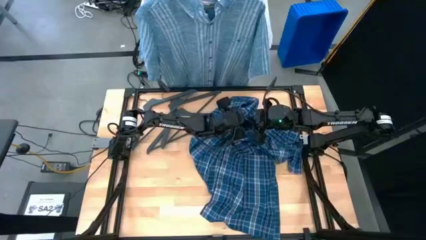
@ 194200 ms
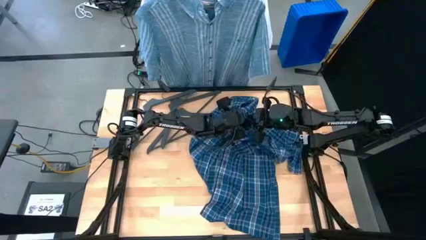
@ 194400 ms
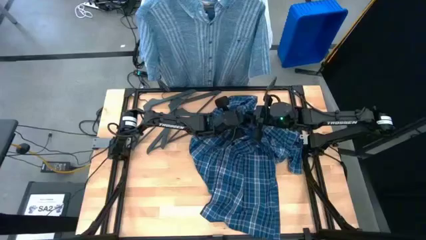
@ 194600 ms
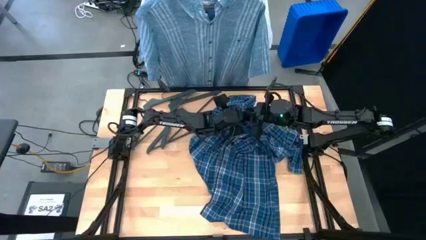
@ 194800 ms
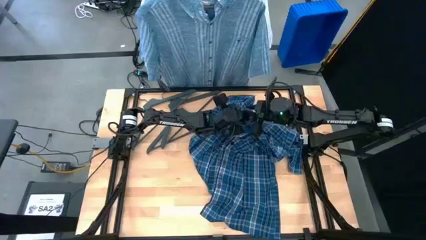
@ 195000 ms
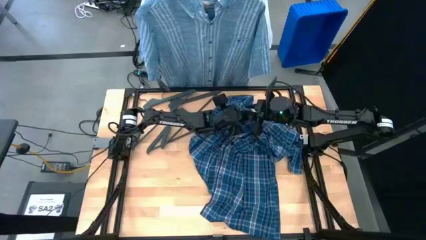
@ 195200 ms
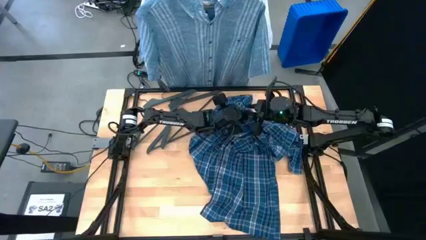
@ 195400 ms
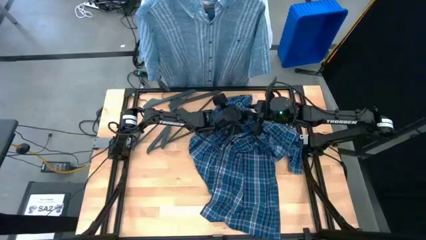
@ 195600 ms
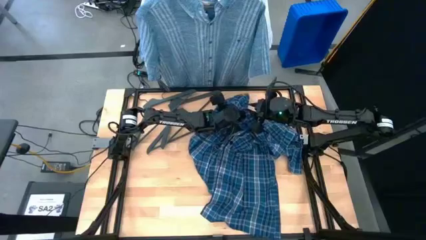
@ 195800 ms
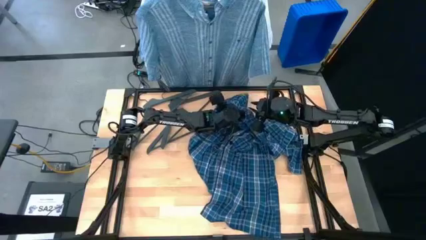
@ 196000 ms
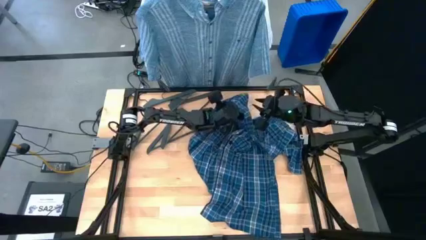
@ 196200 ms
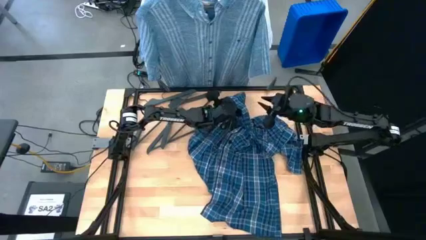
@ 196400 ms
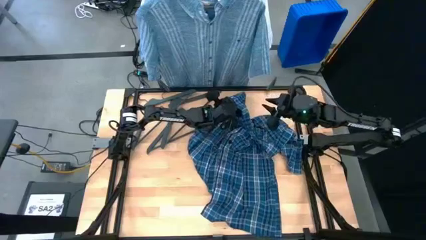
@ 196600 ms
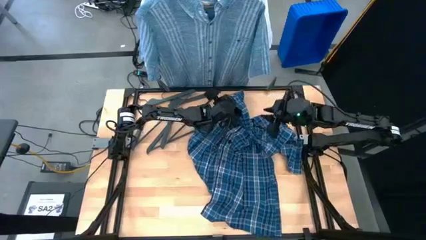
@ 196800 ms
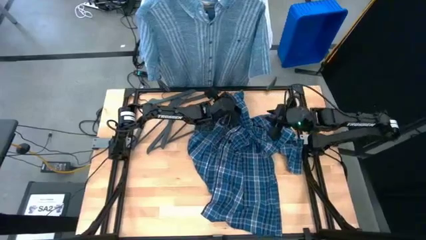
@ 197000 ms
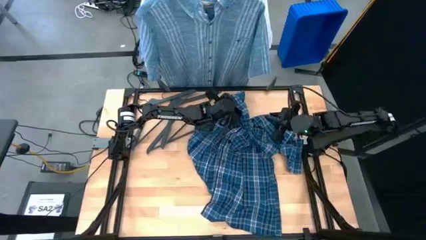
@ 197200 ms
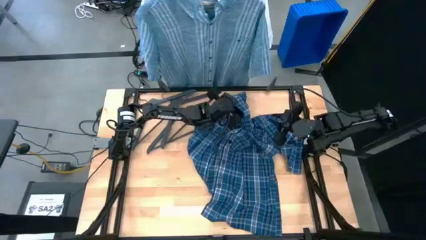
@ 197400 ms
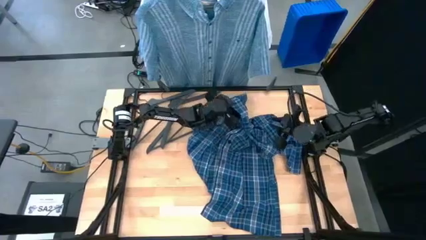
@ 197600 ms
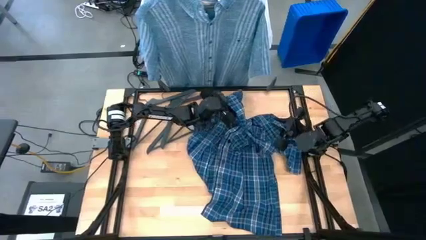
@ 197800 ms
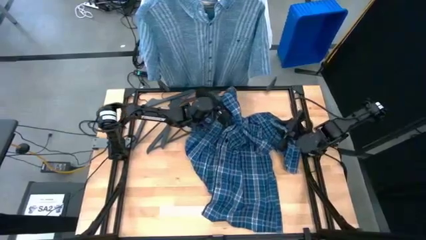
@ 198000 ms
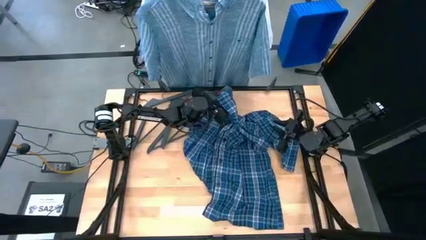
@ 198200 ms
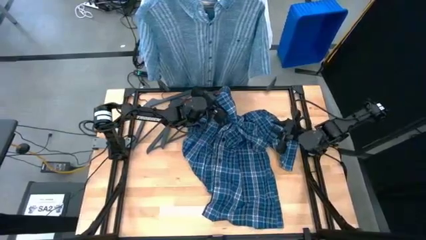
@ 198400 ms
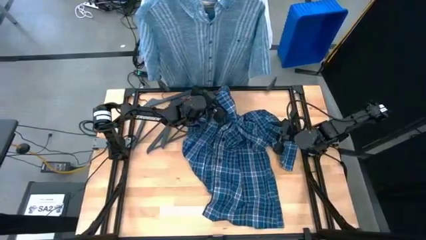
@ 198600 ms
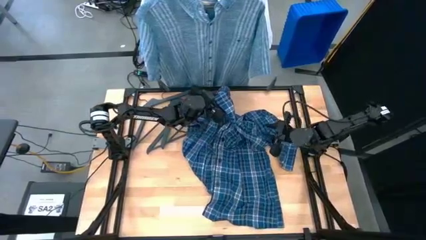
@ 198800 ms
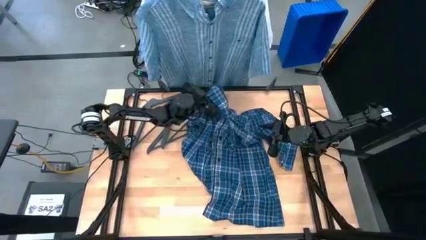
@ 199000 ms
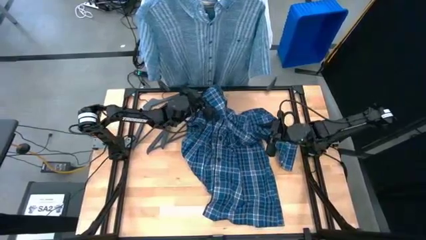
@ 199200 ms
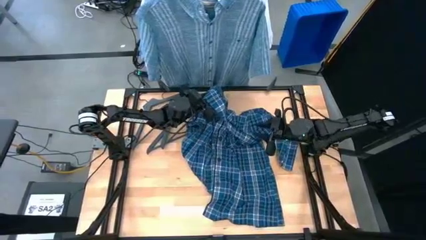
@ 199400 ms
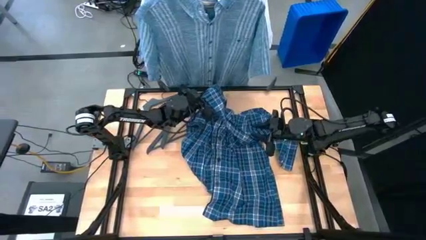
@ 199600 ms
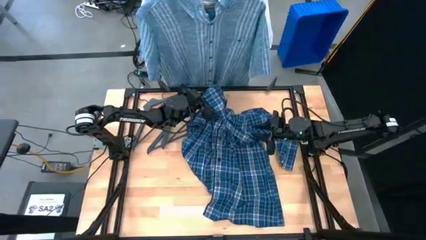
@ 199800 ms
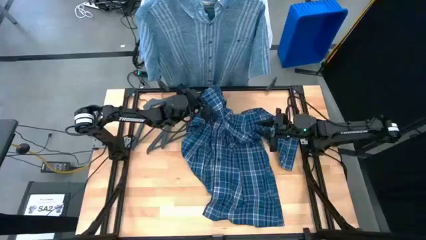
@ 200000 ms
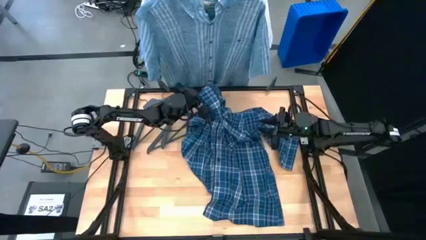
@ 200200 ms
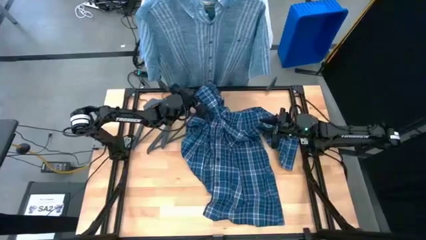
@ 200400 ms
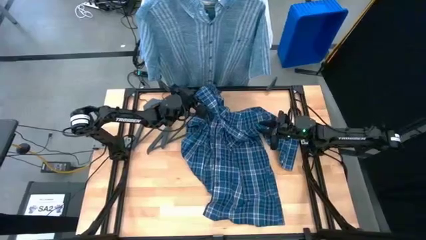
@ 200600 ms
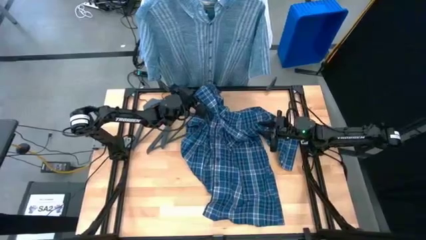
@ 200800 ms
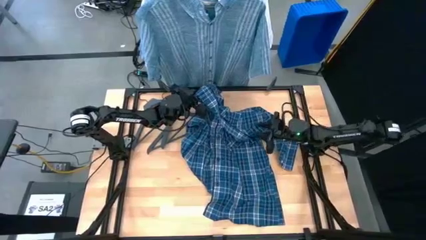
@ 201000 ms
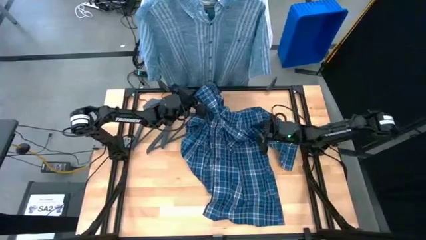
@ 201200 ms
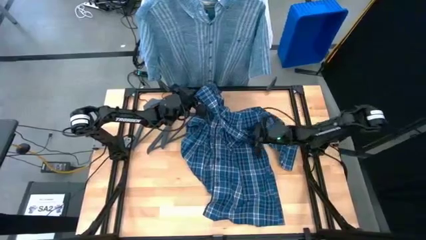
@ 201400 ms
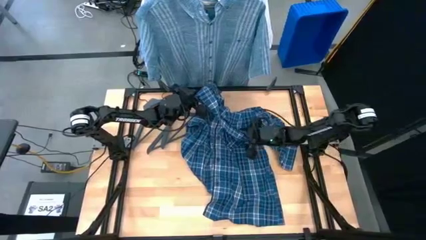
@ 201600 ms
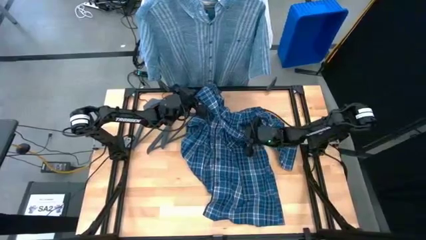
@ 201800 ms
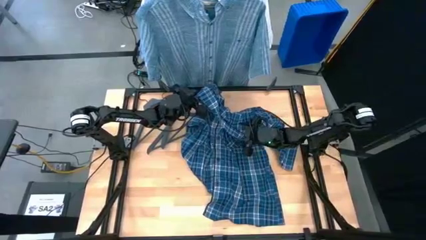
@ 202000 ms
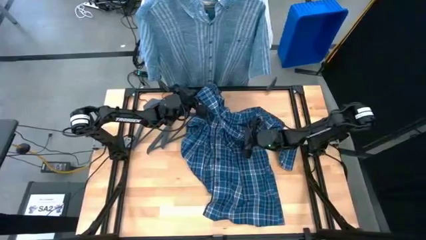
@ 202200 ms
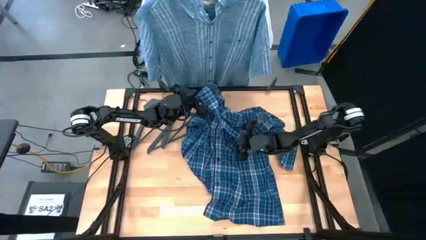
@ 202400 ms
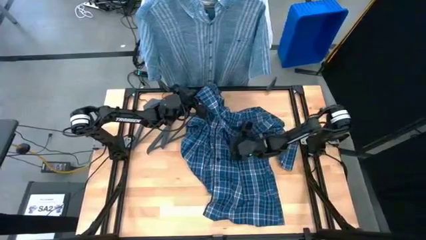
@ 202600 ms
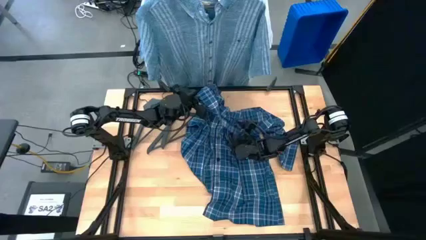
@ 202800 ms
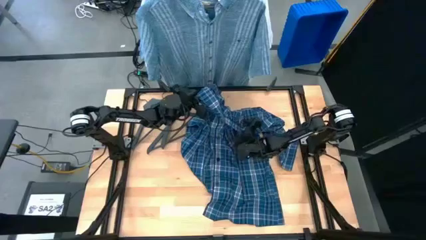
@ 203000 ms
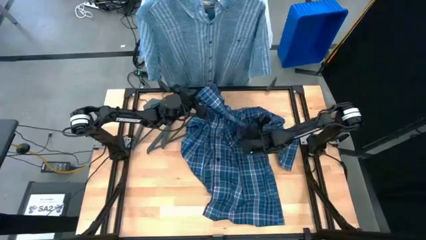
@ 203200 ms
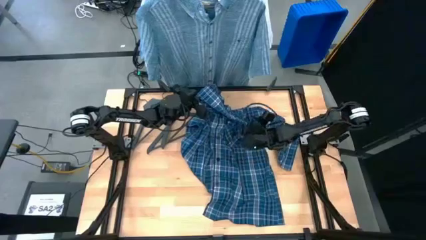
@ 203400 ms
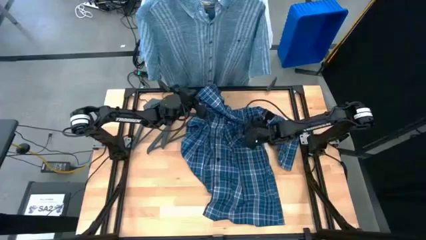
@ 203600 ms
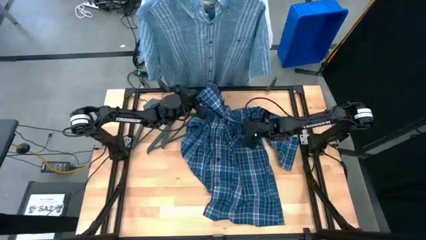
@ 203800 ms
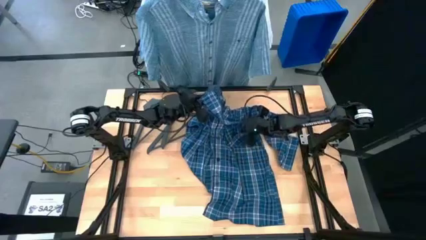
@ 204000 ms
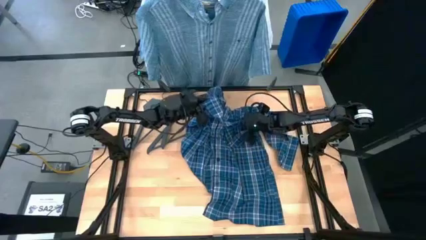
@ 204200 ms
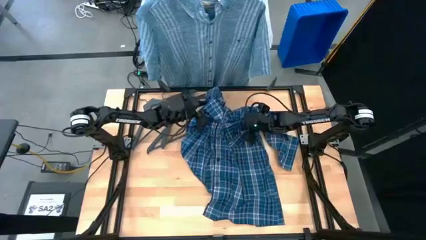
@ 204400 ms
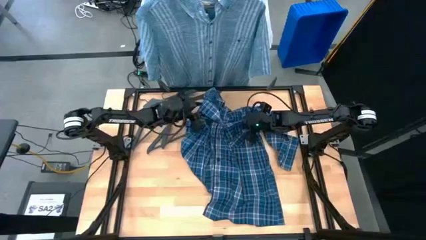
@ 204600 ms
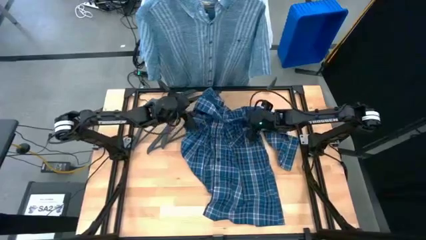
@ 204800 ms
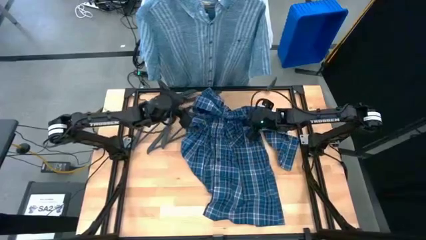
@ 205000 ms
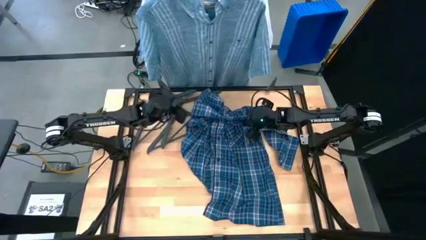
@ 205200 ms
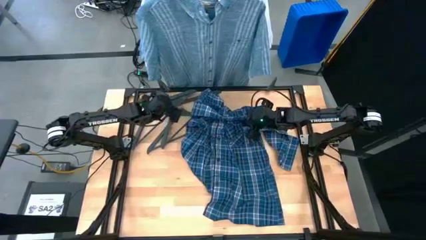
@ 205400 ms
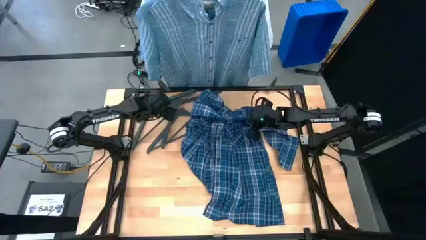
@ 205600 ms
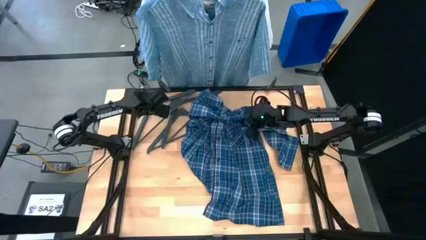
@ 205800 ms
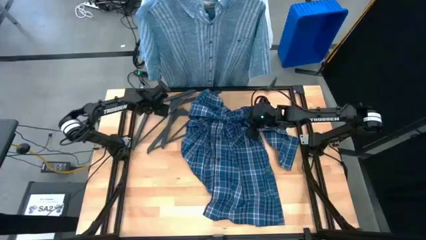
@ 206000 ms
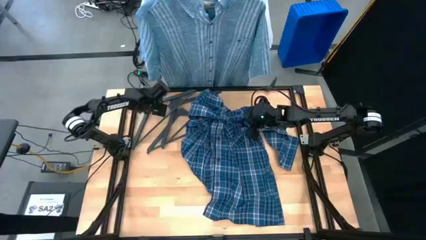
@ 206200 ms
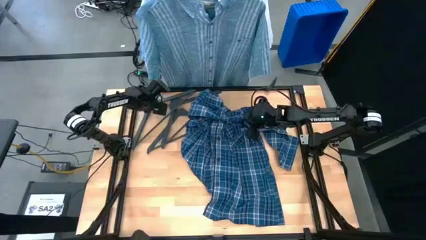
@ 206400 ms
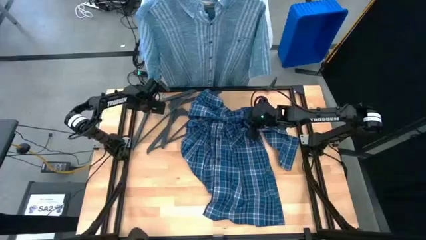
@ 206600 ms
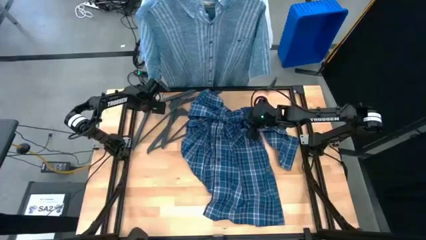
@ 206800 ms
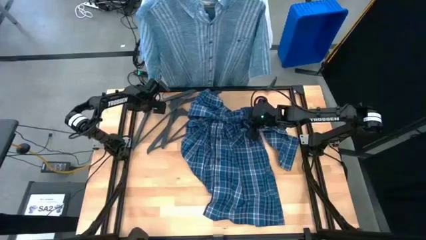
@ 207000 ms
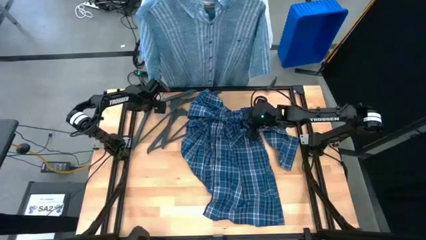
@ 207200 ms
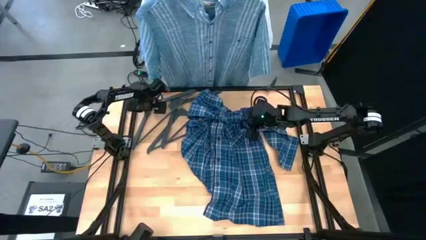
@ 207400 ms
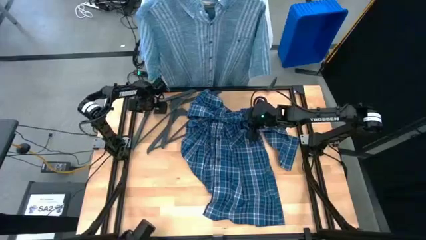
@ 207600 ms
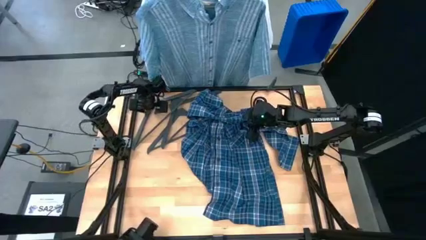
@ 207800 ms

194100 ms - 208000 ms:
Task: Hang clothes
Insert the black hanger into the blue shirt

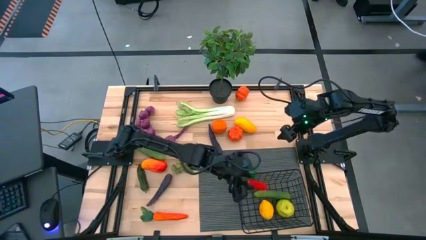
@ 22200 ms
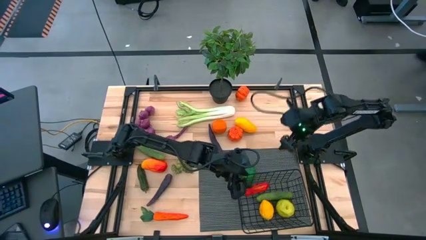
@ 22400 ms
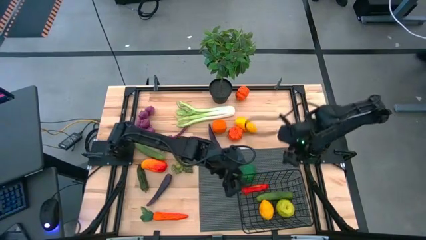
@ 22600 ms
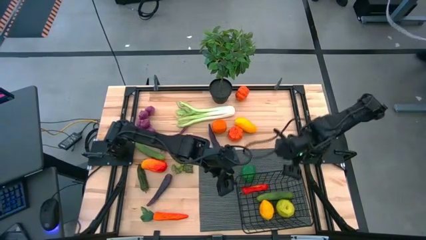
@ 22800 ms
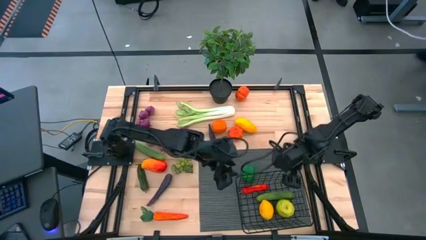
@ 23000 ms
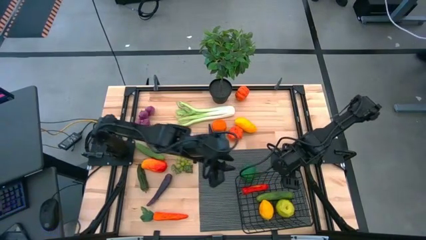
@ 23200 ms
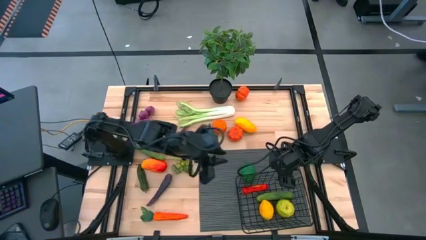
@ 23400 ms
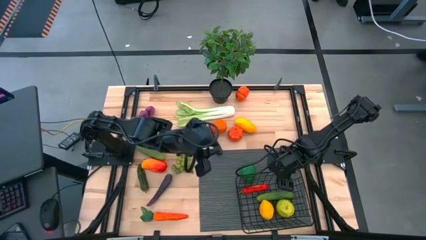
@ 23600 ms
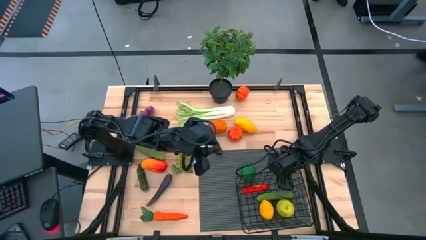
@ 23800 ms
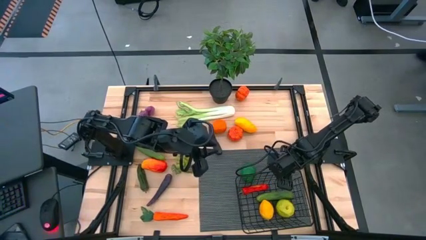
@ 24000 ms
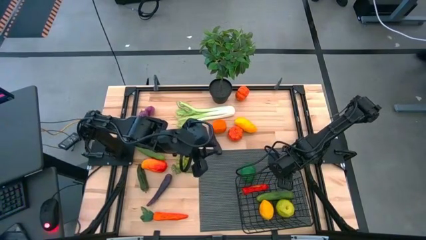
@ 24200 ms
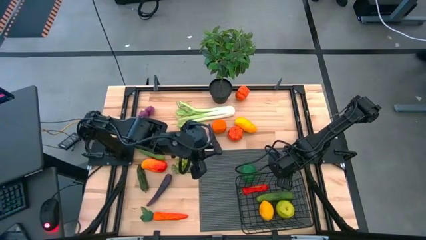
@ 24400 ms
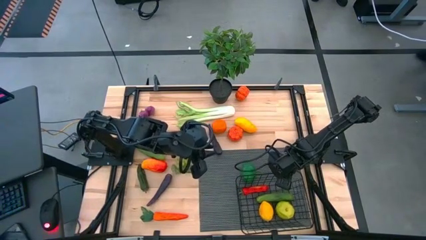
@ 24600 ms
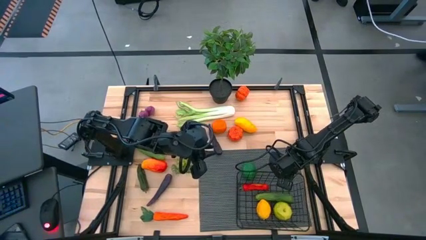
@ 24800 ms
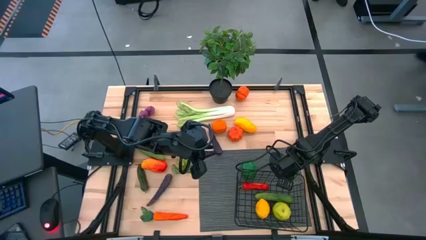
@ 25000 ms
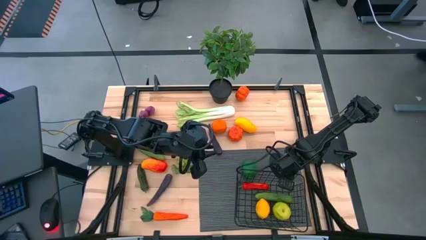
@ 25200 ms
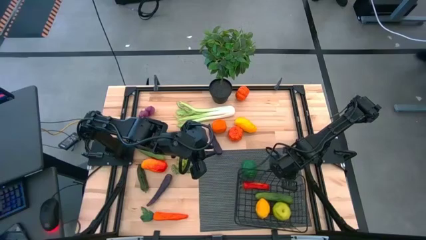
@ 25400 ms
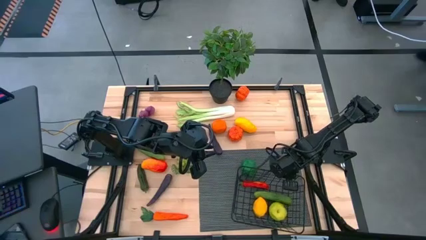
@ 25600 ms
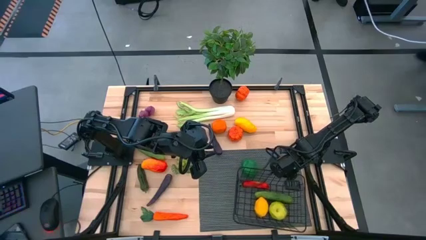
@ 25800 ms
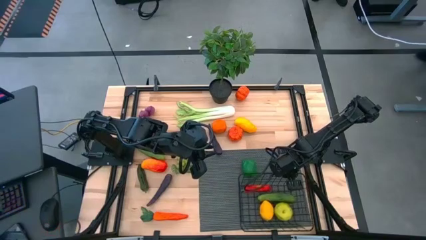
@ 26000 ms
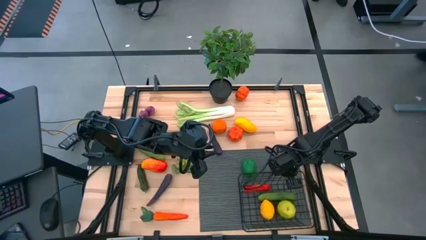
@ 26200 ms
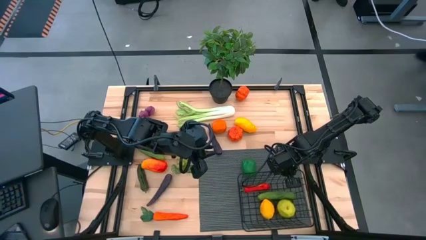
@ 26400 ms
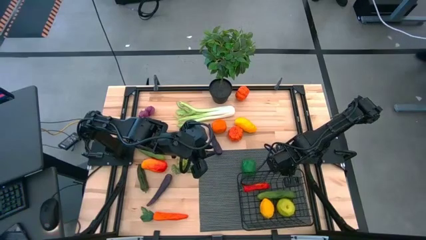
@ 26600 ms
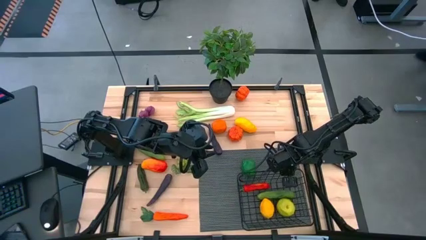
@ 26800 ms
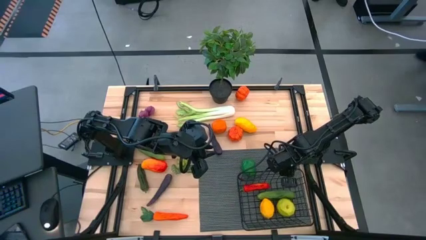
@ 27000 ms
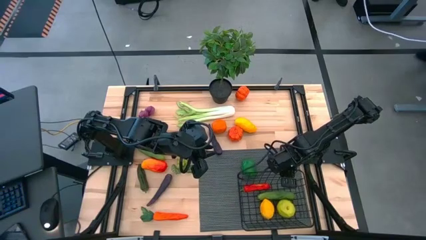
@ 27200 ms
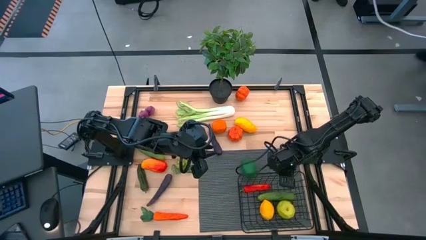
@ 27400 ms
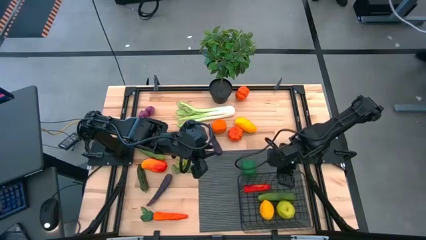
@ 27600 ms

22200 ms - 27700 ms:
Task: Build produce basket
Adjust the black wire basket on the gray table mat
